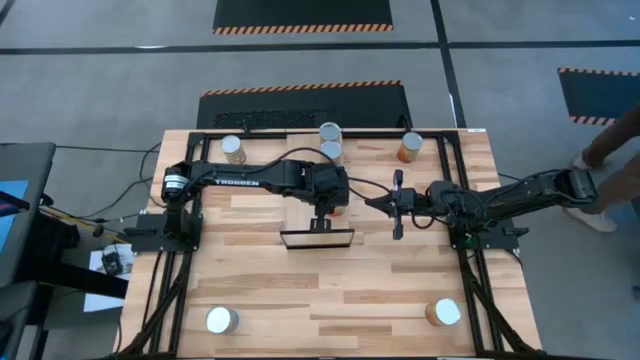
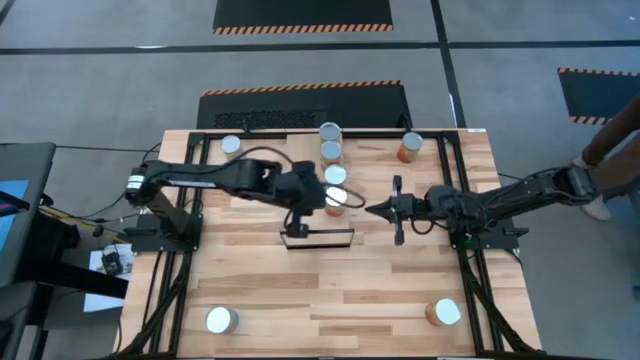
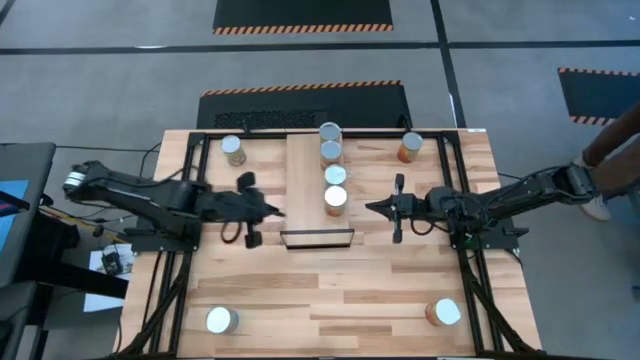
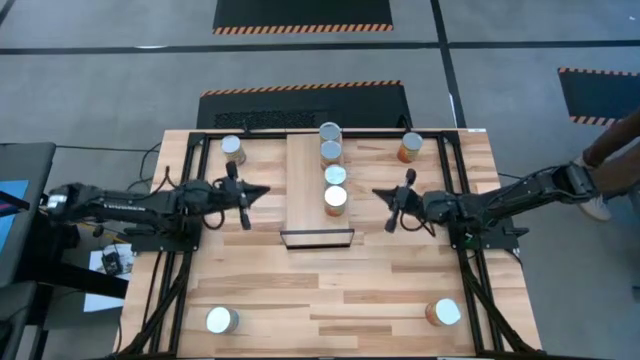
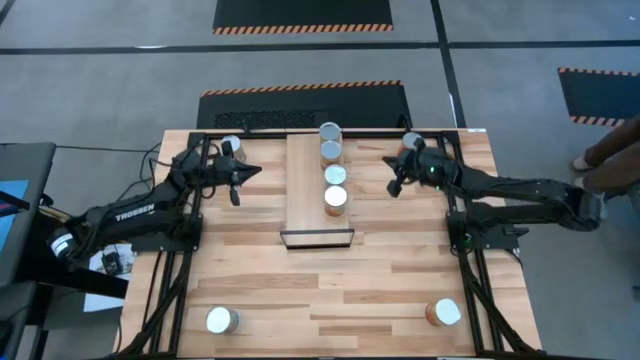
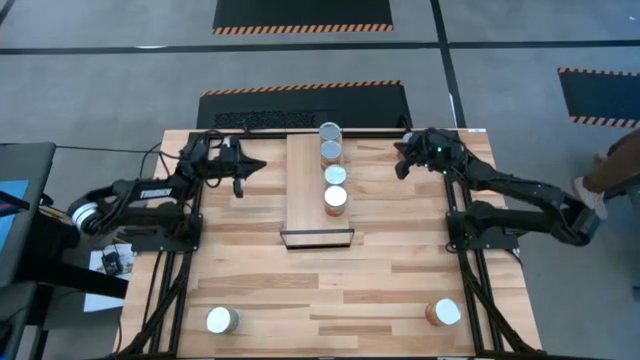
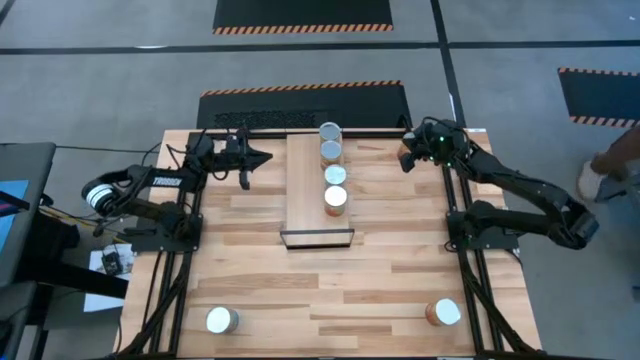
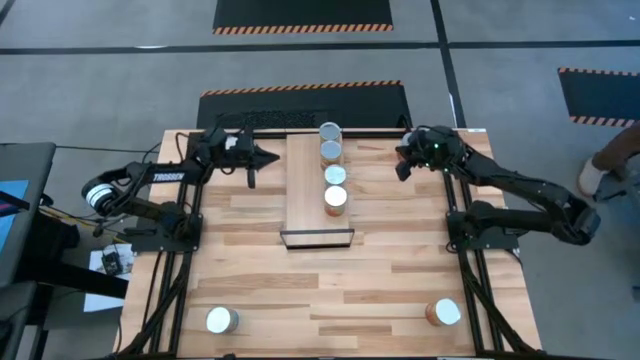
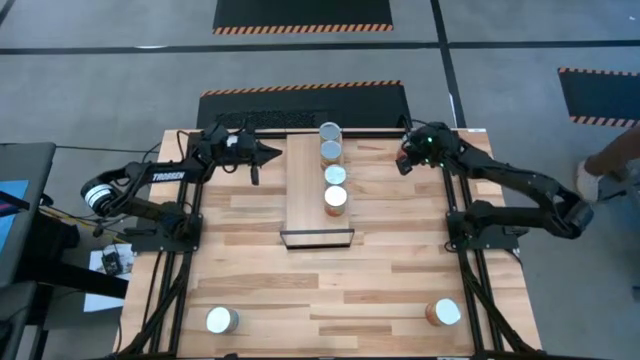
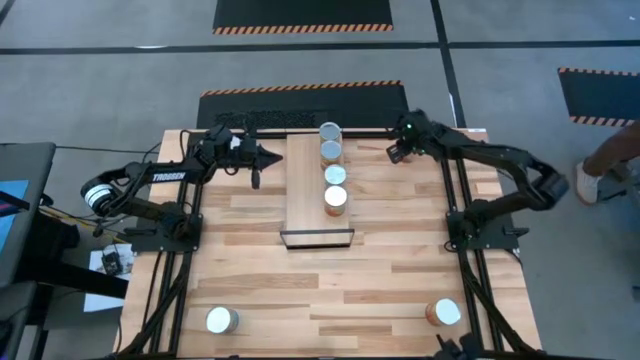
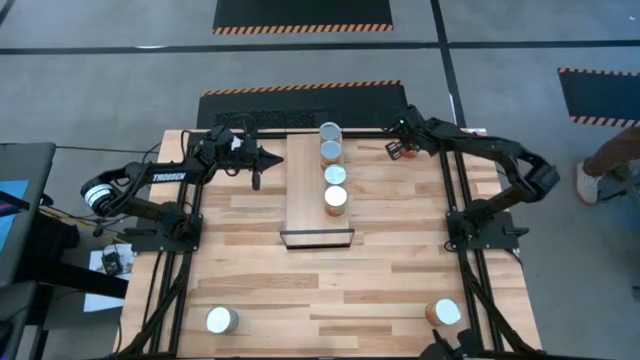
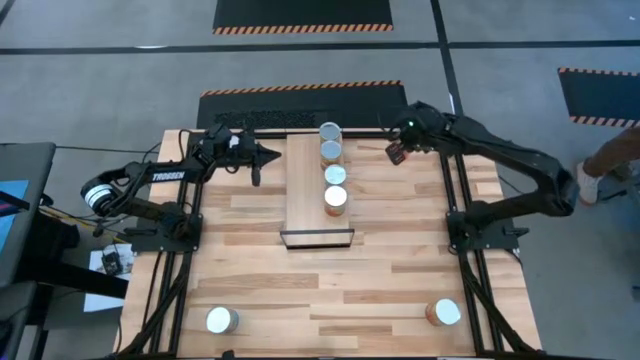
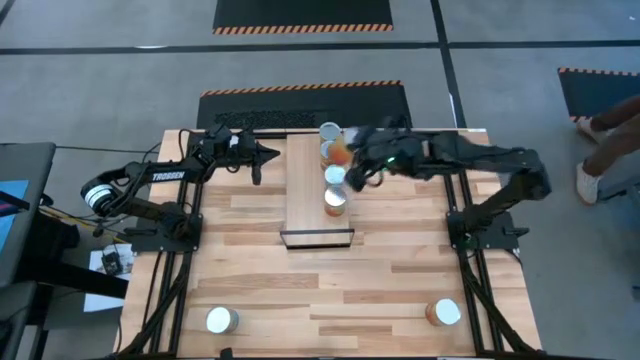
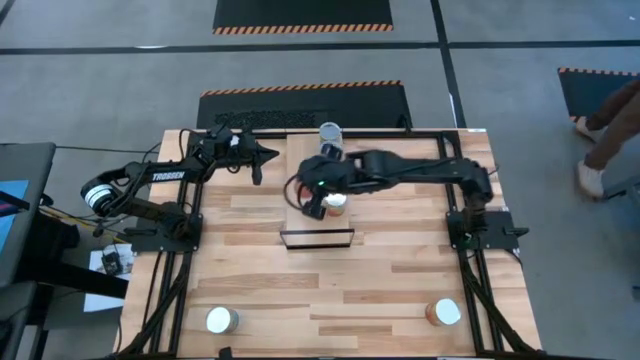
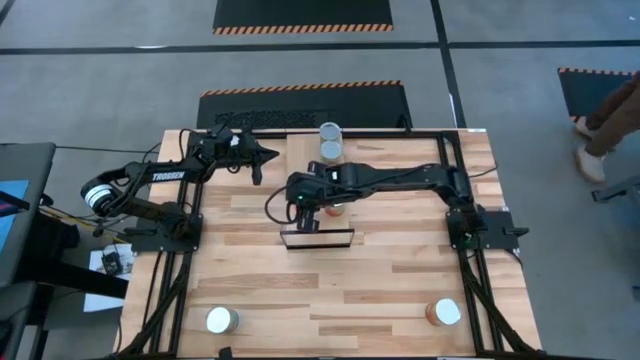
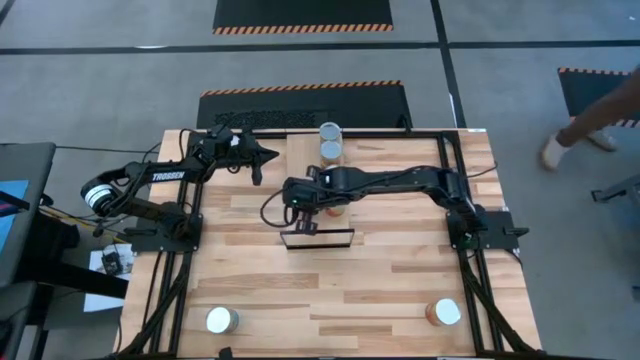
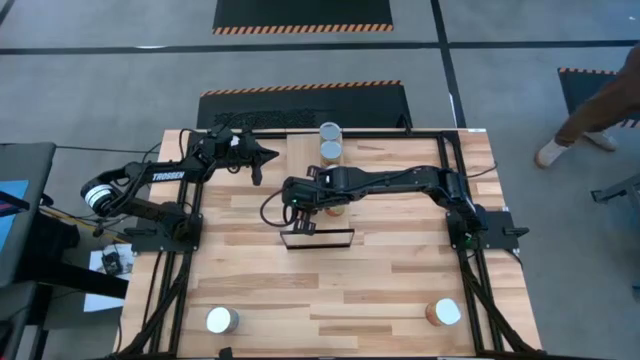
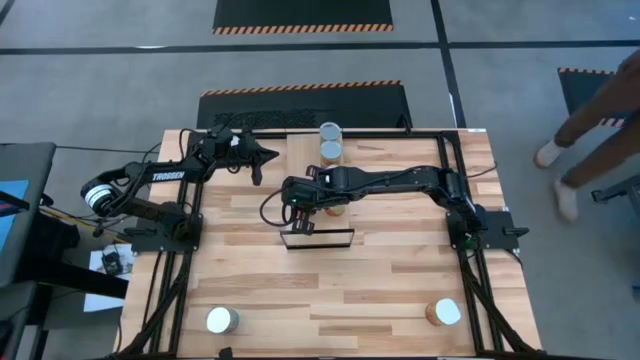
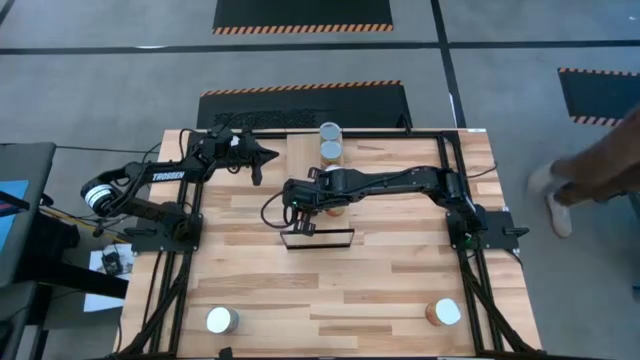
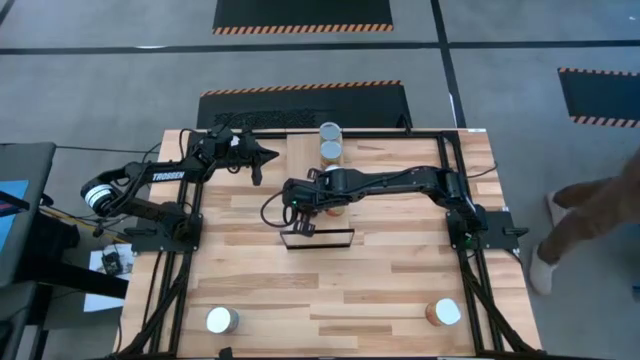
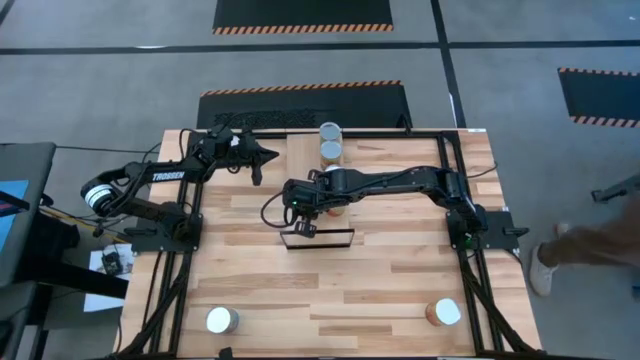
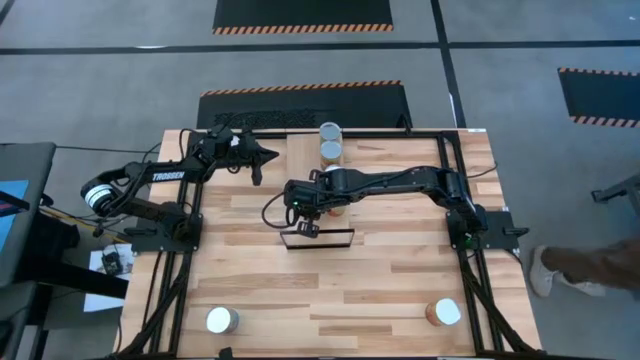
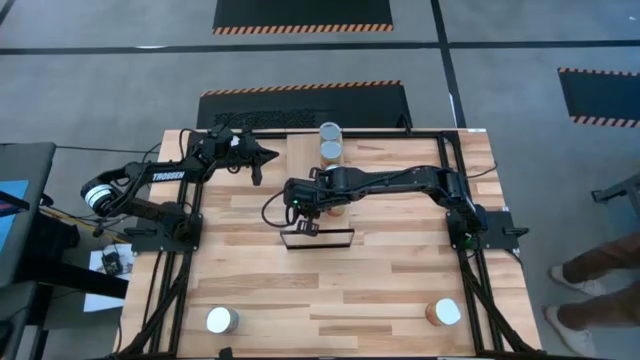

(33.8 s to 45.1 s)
Task: Pick and place cans onto a shelf
Align the canned green peas with the other canned green peas on the shelf

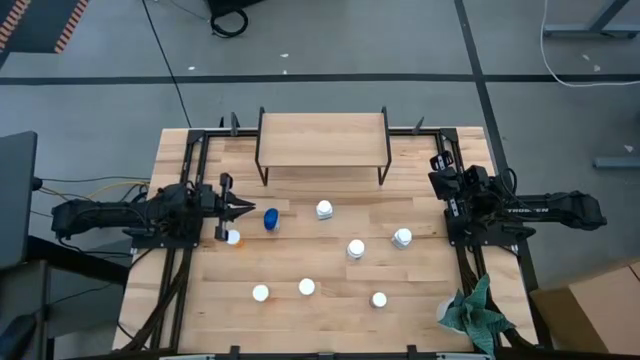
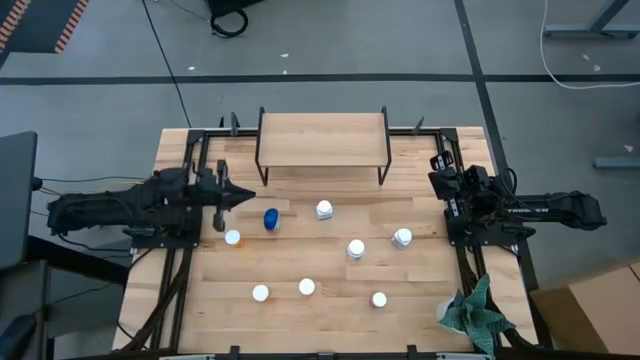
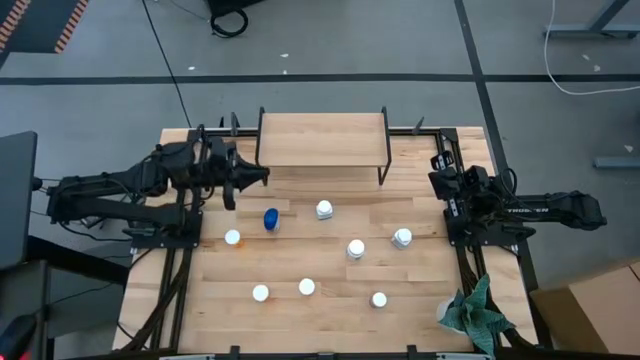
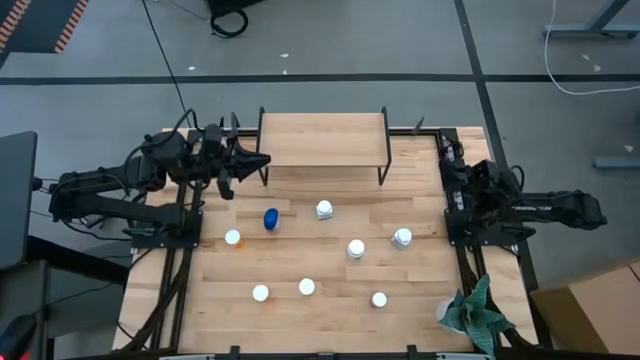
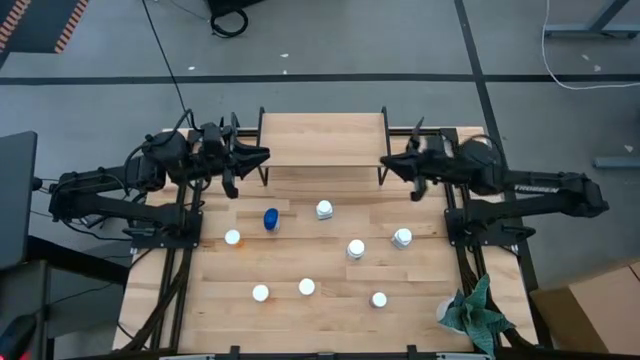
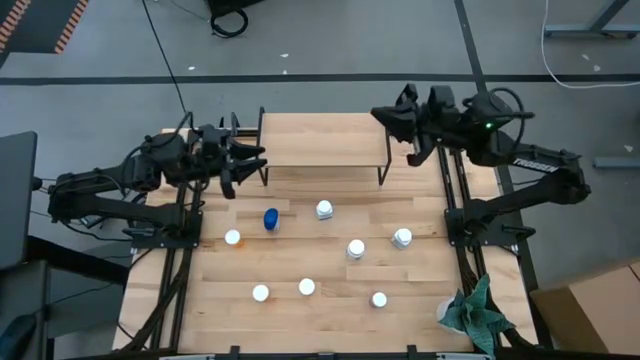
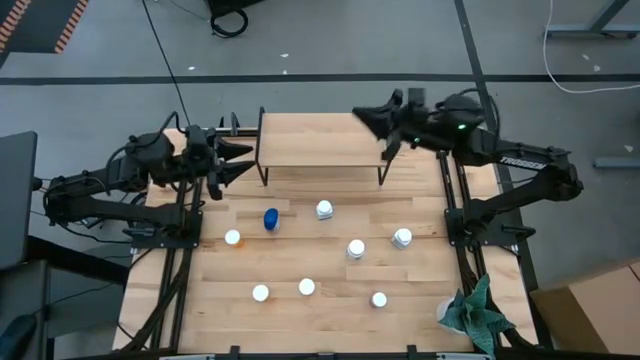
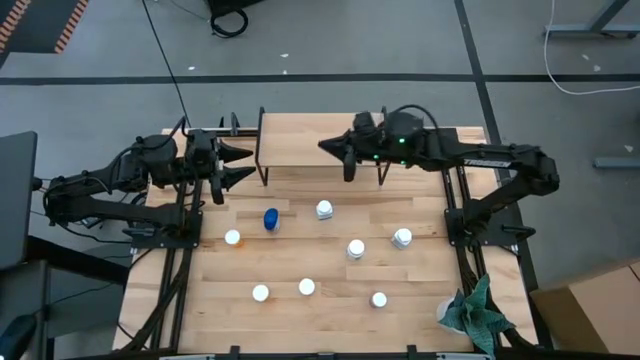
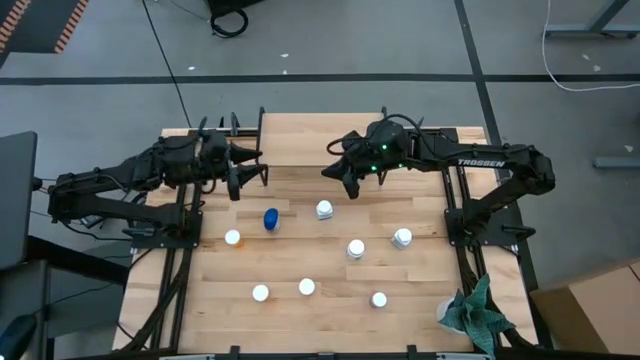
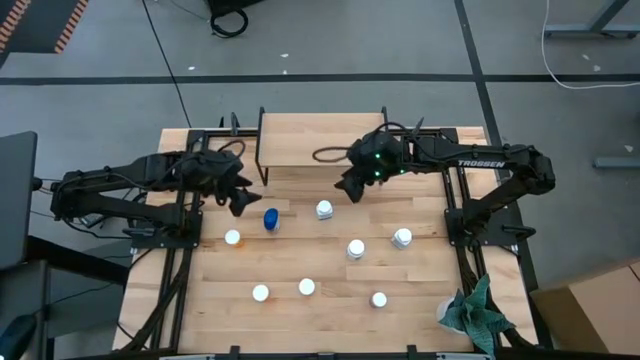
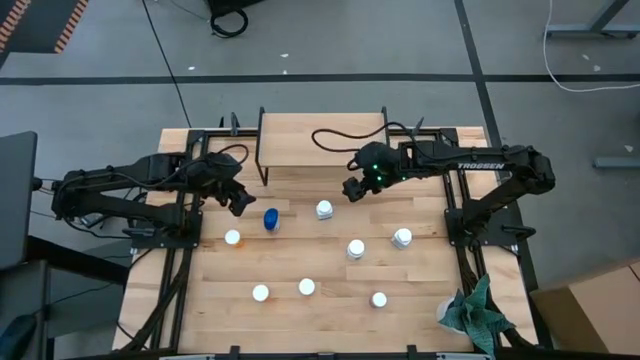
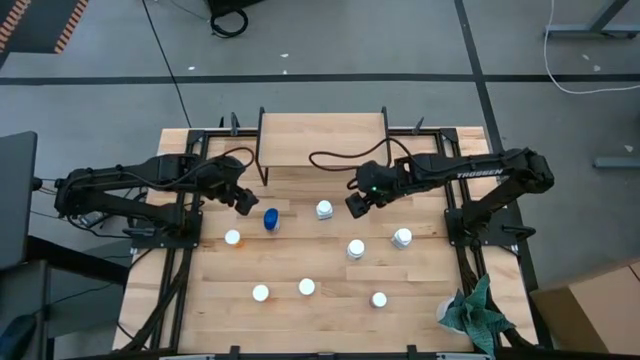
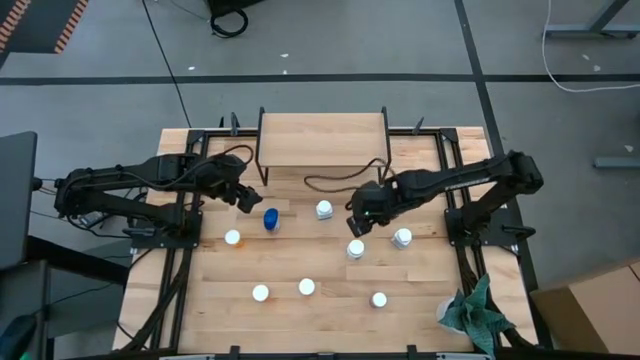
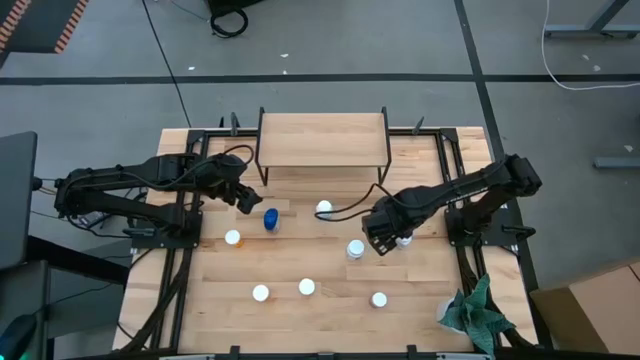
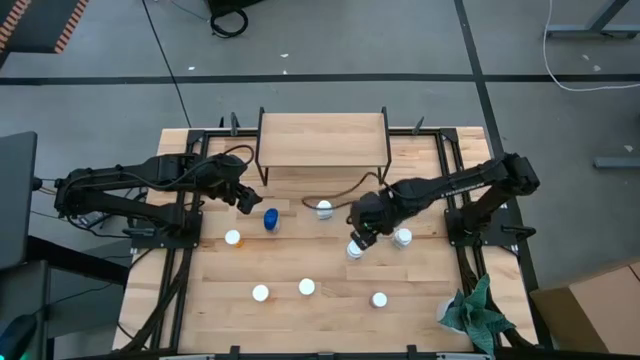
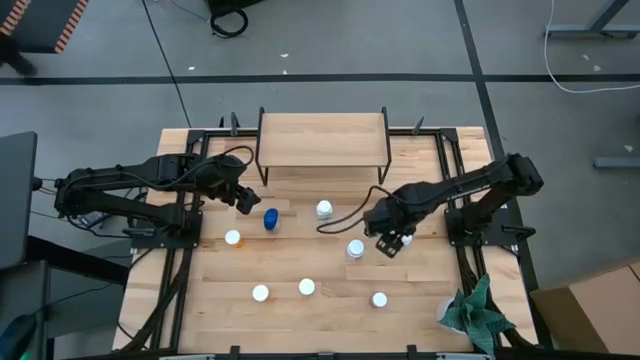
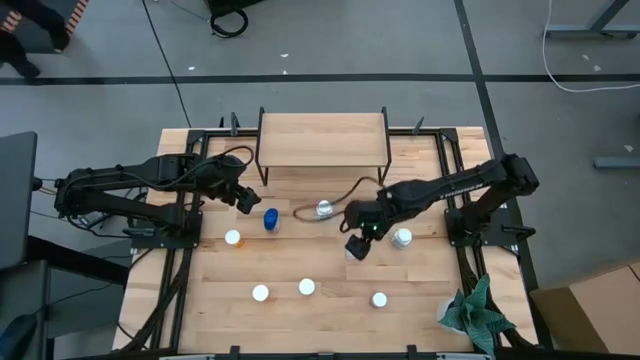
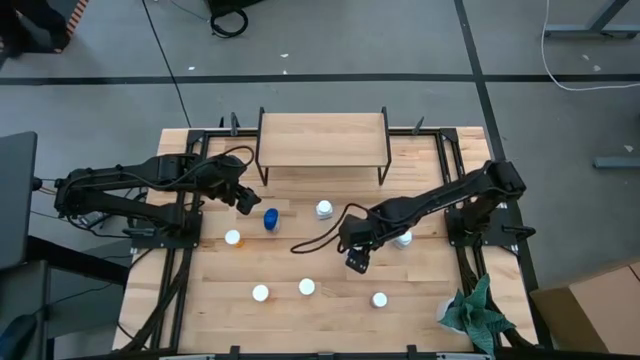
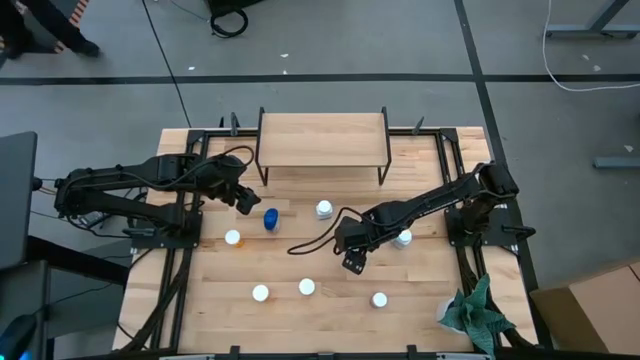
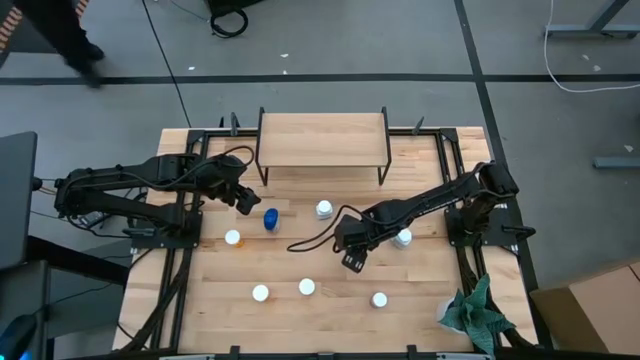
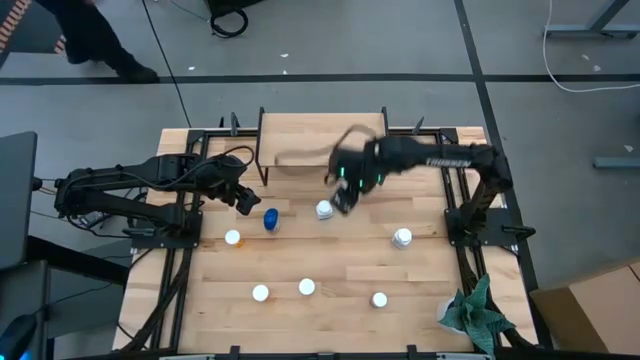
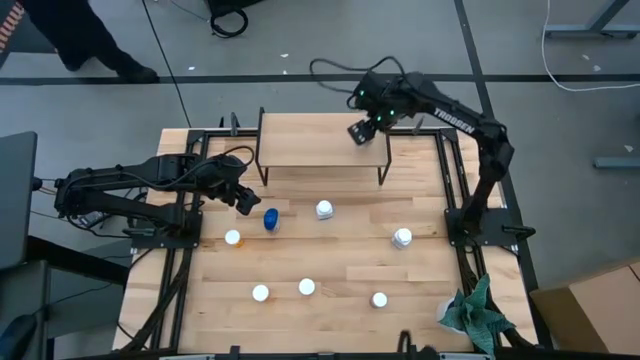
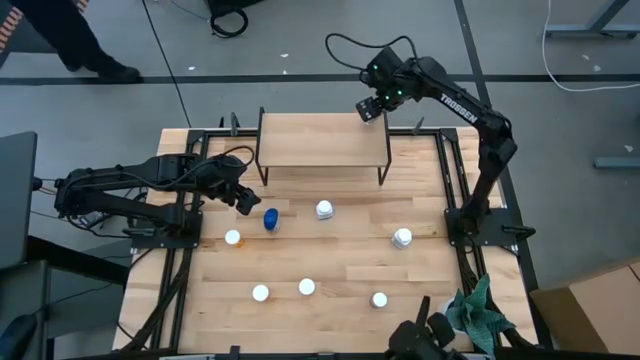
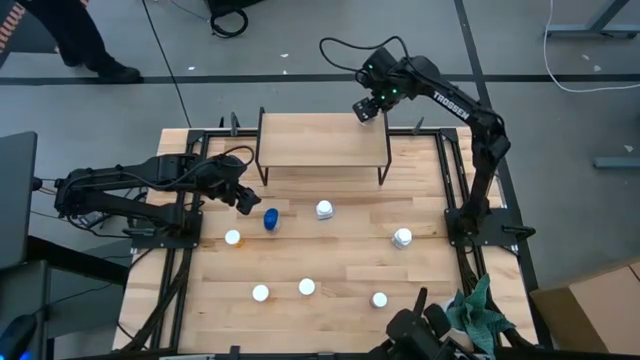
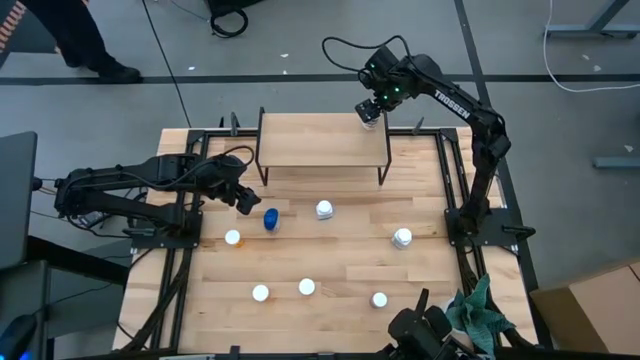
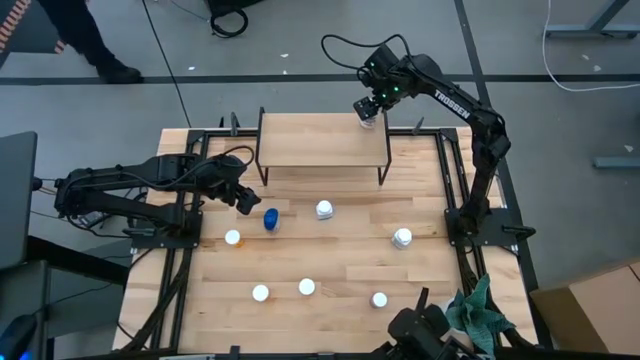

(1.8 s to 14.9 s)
Task: Pick and place medicine bottles onto shelf by color
Put the white medicine bottle on the shelf
